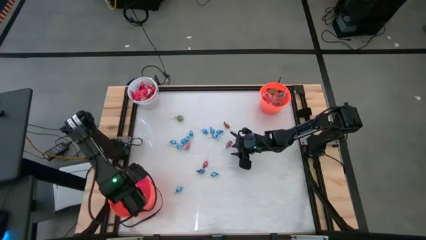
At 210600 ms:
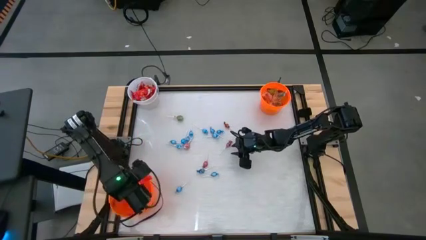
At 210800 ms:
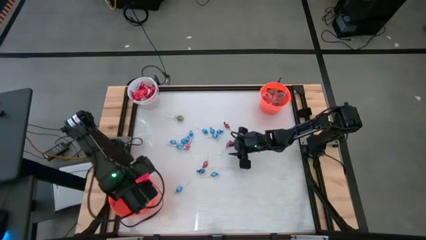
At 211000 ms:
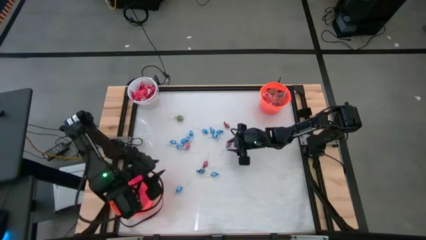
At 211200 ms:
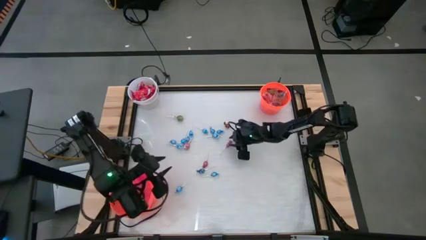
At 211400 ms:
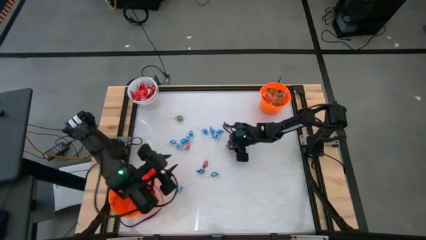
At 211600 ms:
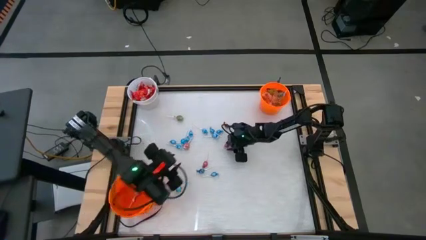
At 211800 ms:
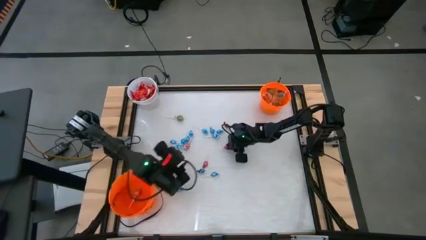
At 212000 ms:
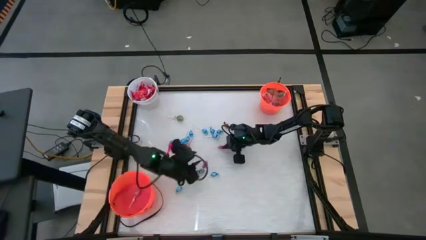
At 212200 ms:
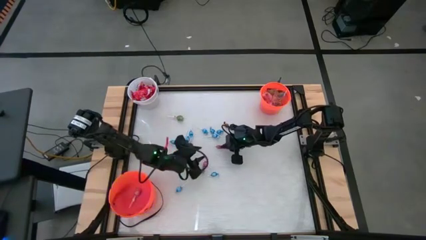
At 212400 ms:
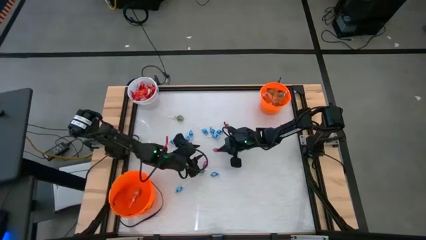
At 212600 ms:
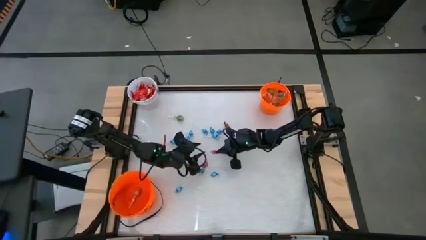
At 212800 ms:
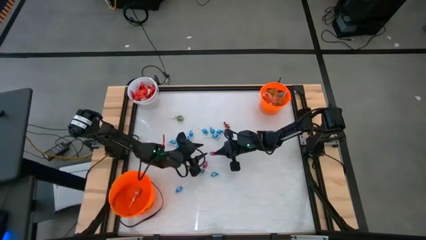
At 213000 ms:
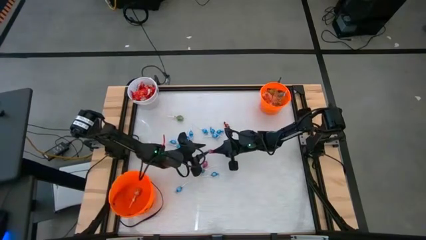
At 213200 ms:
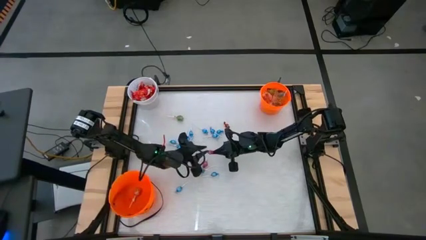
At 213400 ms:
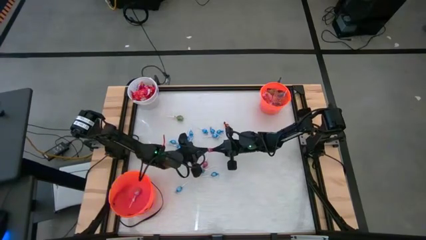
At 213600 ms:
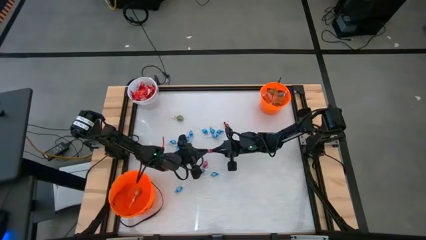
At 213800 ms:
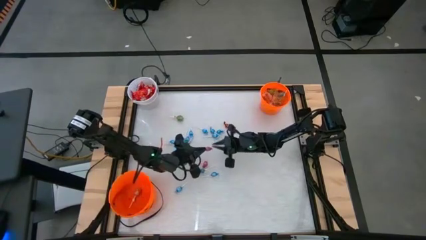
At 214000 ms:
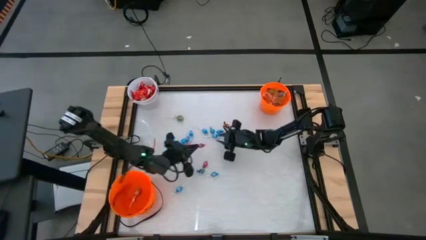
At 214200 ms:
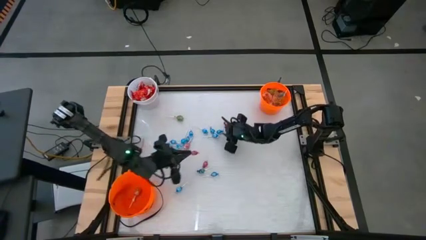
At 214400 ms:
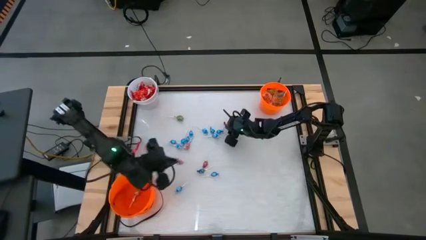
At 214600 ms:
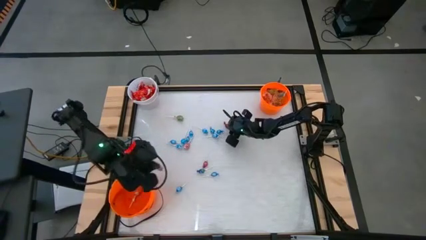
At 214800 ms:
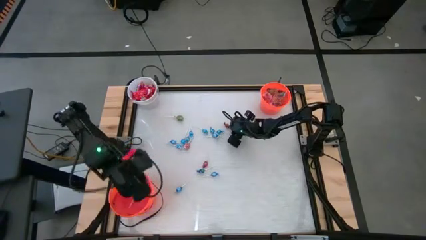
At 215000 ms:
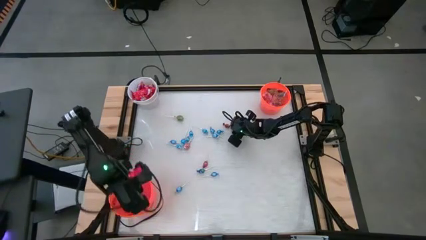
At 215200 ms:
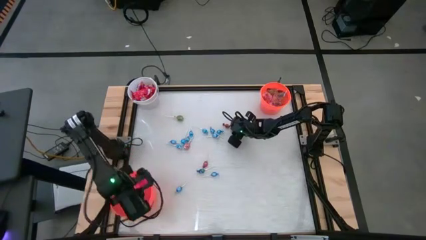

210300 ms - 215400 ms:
Task: Sort candy by brand, put in halloween buckets
Put the top right pink lollipop into the bottom orange bucket

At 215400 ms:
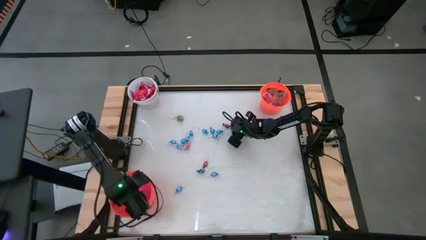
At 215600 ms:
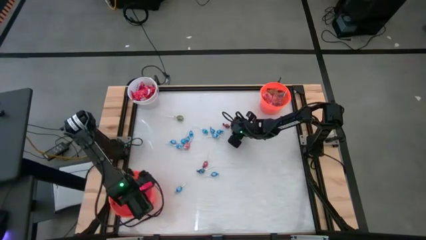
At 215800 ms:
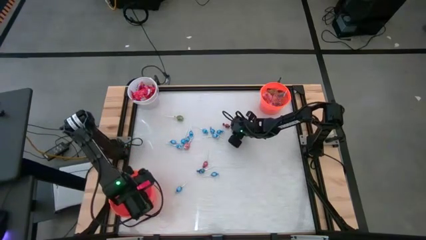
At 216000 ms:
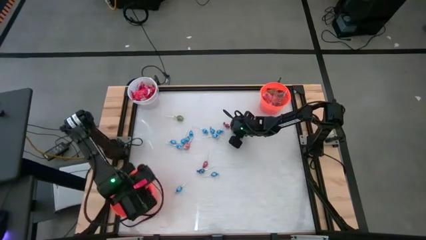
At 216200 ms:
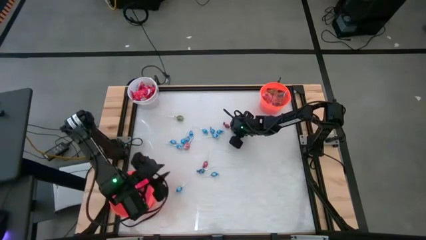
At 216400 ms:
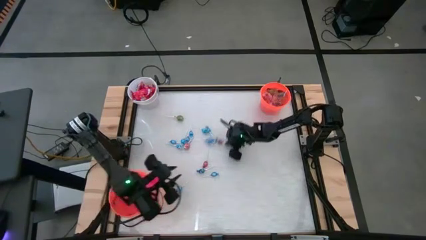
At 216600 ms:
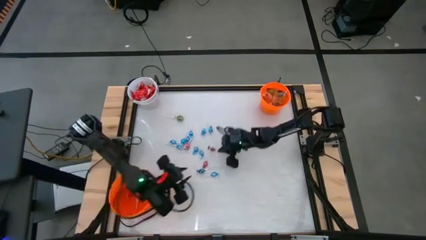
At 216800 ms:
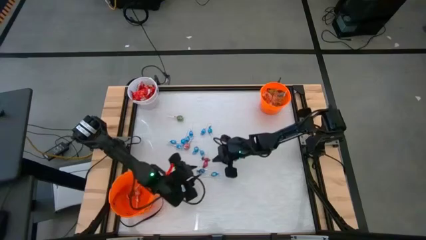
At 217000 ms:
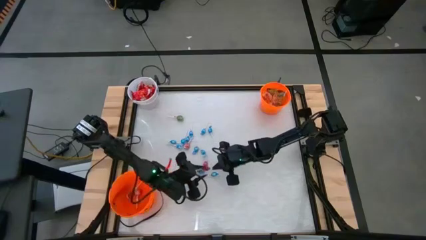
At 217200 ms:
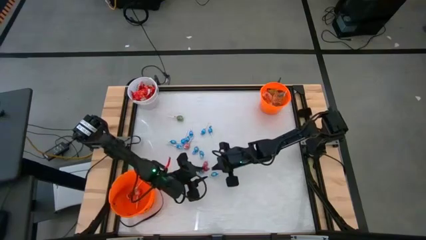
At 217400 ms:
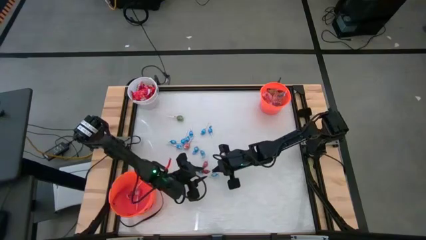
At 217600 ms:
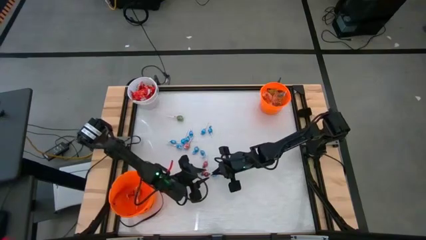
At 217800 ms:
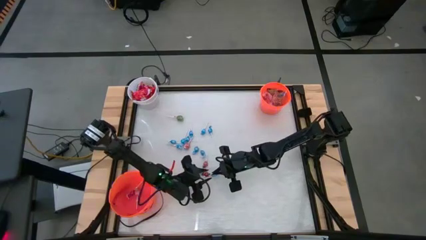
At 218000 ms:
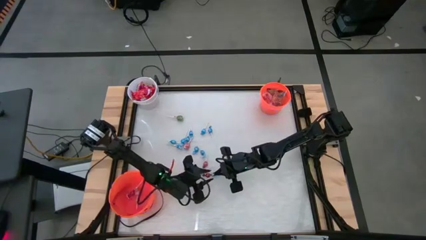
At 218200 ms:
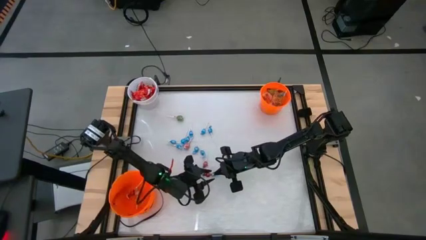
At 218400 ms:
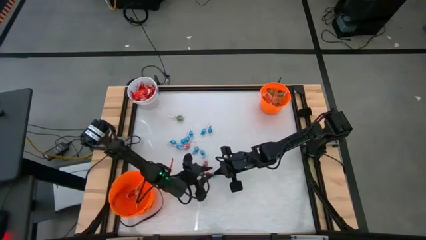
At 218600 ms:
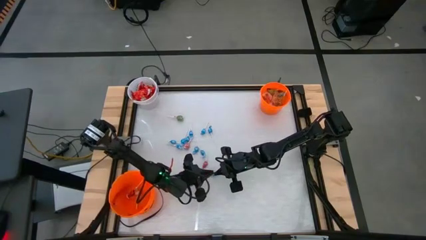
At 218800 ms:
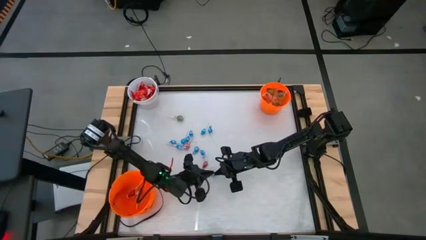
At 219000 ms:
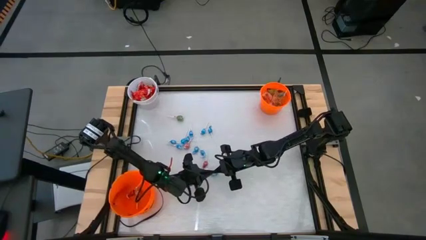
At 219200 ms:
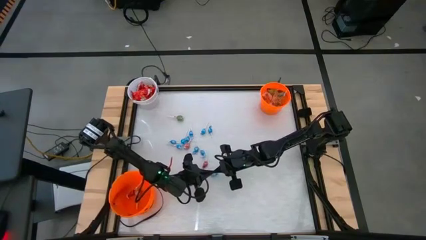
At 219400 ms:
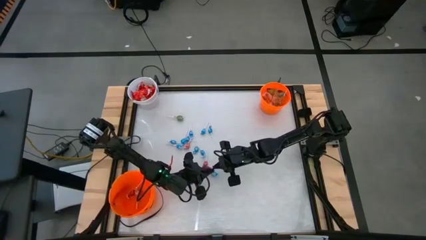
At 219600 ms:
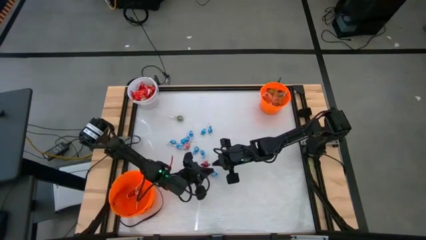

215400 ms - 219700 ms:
Put the red lollipop into the bottom orange bucket

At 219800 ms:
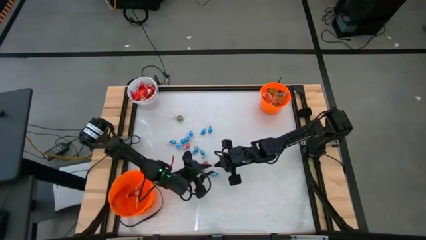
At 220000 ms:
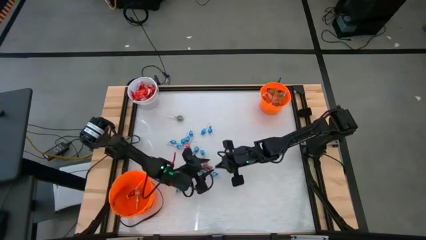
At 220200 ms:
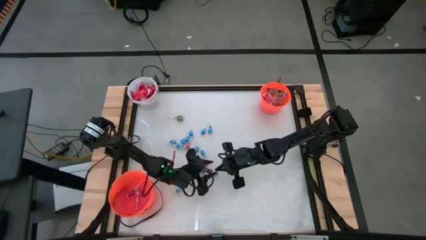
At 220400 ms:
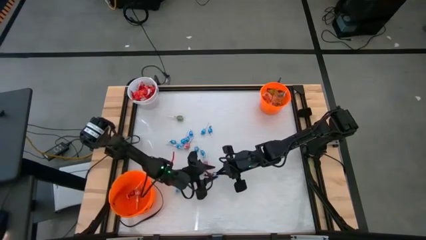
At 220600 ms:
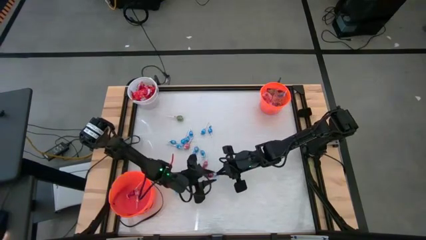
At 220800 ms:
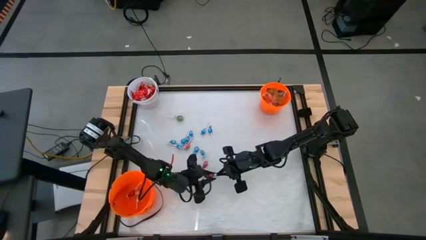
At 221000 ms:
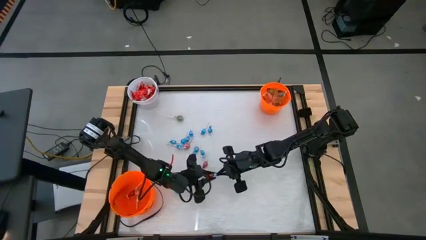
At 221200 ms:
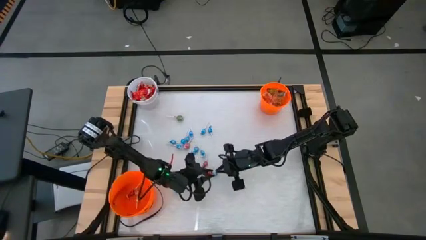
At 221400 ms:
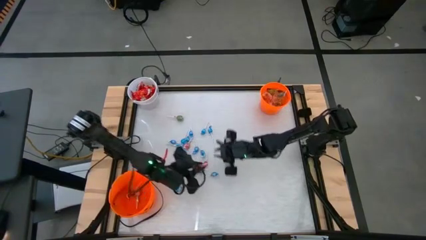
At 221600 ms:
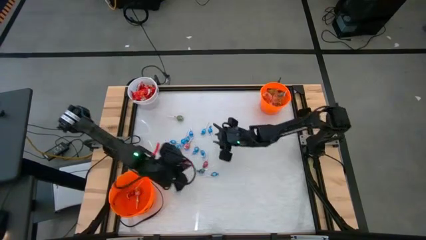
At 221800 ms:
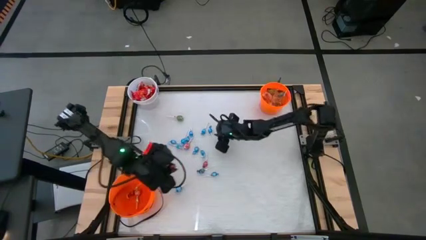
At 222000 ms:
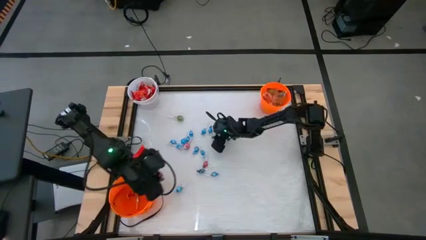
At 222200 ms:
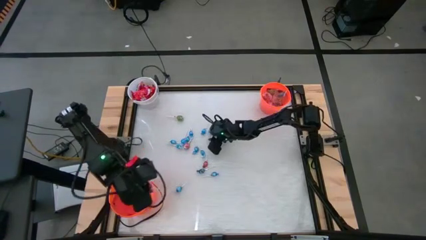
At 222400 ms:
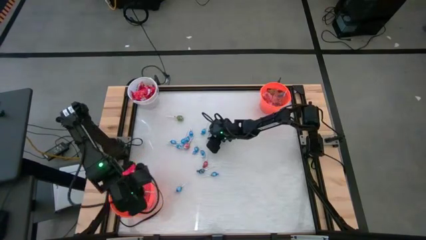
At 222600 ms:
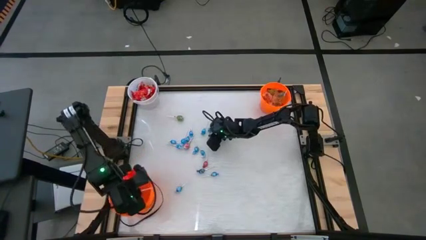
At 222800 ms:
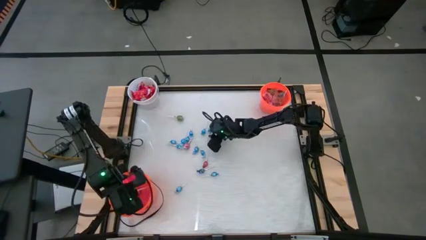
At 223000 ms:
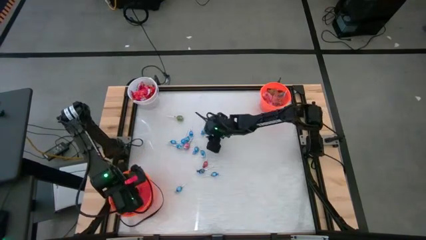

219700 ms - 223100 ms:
Put the red lollipop into the bottom orange bucket

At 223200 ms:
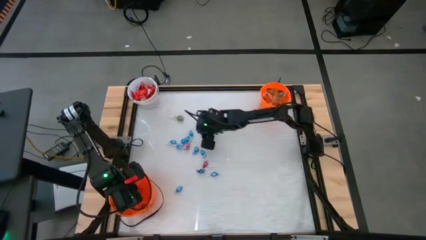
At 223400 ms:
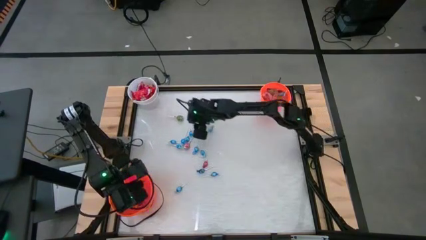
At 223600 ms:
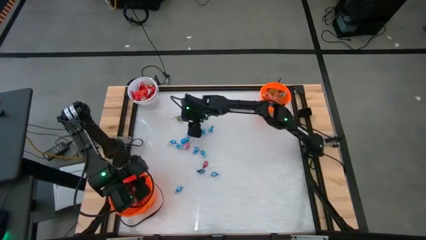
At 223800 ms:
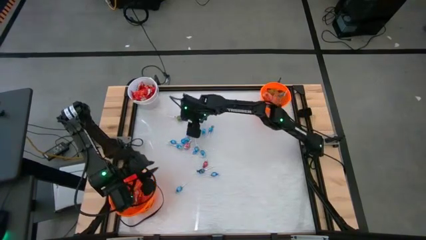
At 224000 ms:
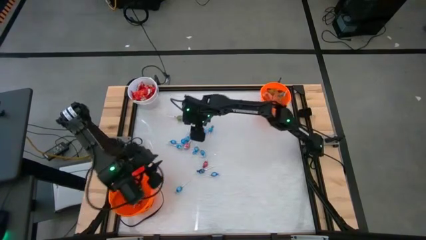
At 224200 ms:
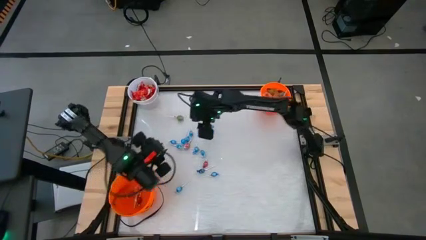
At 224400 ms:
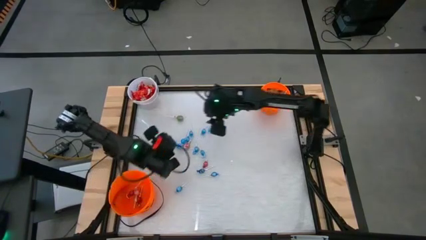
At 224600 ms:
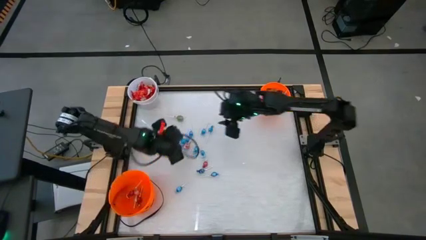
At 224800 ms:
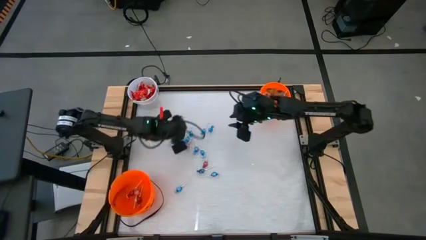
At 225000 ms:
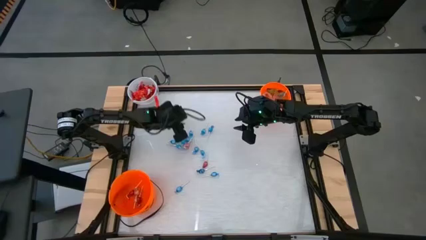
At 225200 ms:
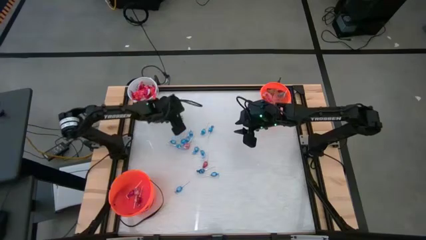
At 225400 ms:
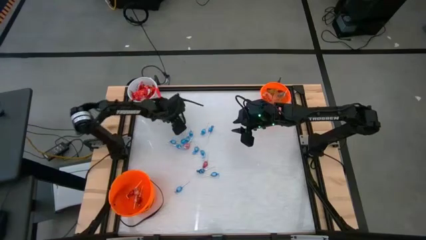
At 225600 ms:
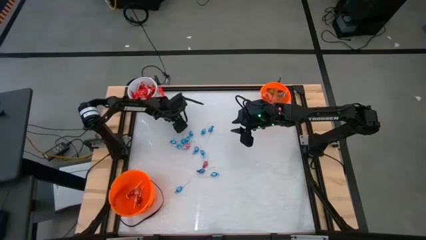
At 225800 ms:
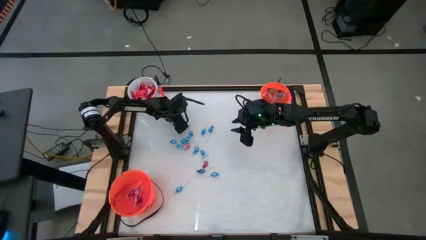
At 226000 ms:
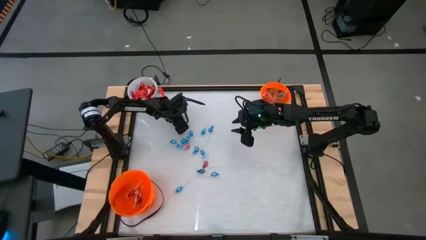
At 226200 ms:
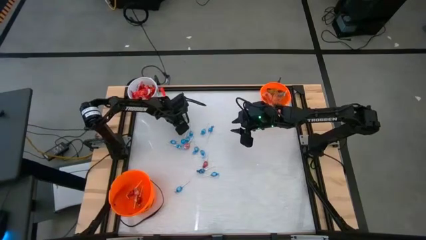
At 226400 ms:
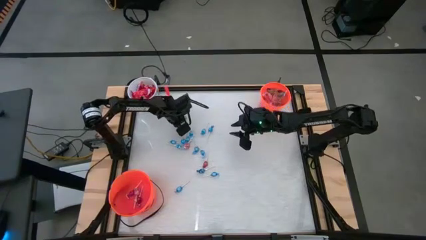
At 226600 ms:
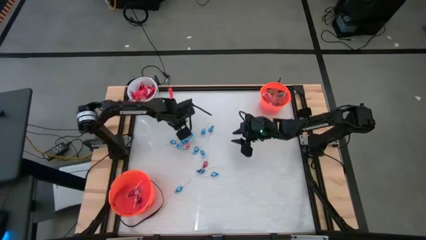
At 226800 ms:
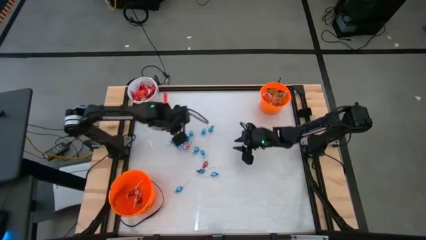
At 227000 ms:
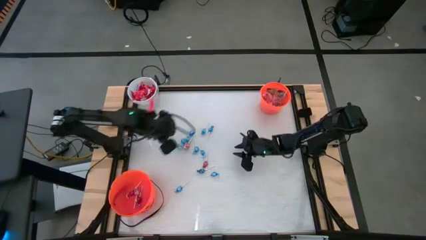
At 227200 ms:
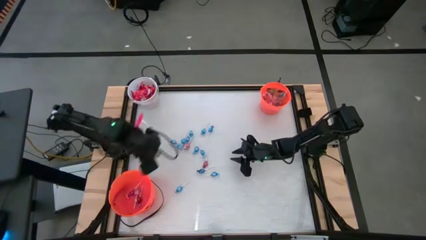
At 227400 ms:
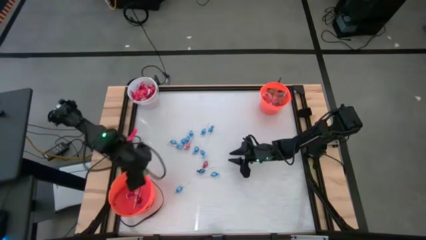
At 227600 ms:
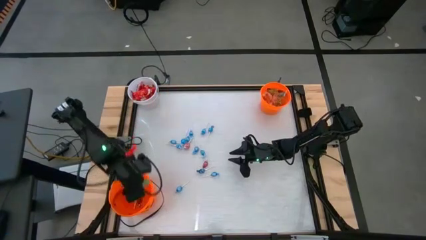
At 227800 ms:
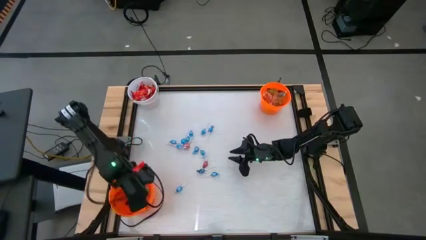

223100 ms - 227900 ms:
Put the green lollipop into the bottom orange bucket
